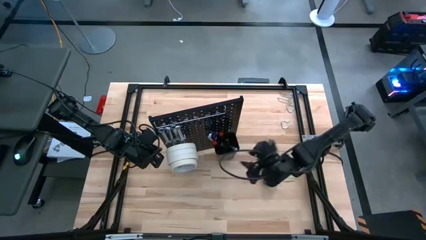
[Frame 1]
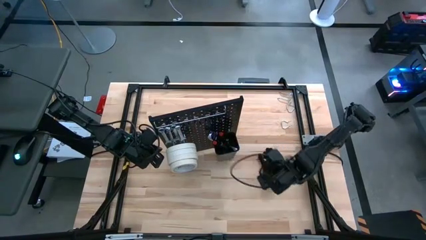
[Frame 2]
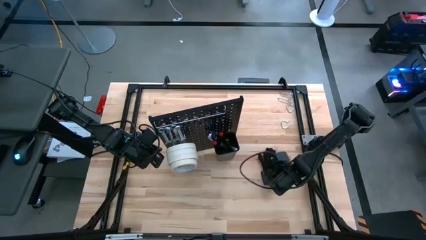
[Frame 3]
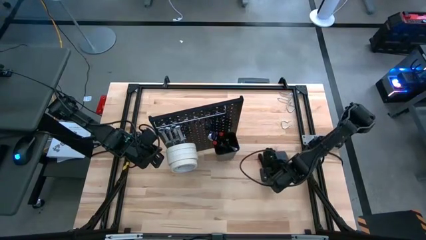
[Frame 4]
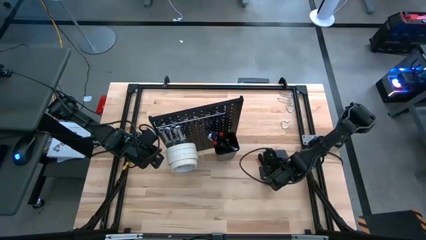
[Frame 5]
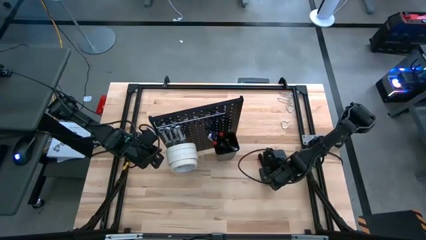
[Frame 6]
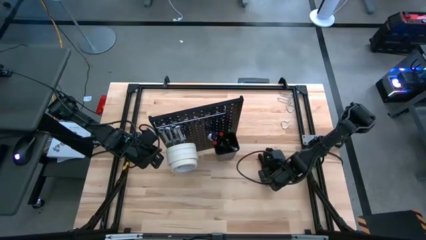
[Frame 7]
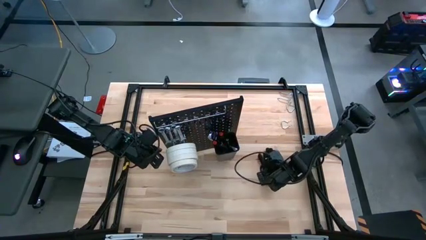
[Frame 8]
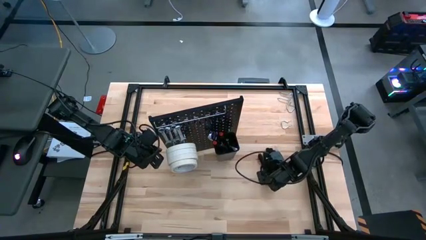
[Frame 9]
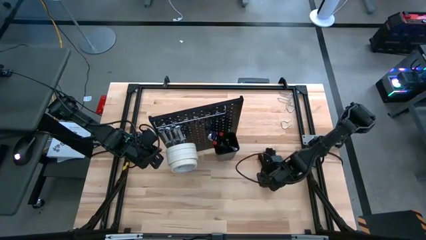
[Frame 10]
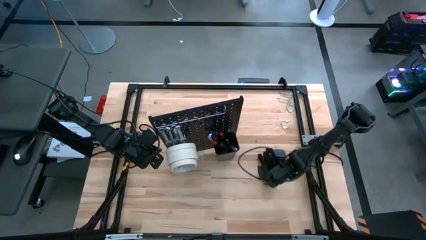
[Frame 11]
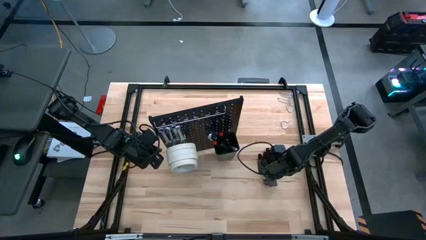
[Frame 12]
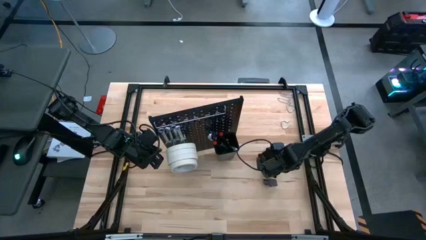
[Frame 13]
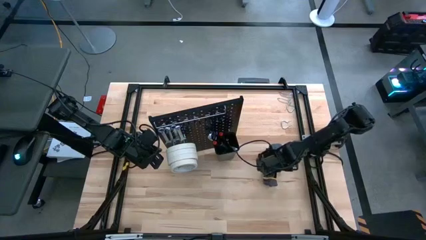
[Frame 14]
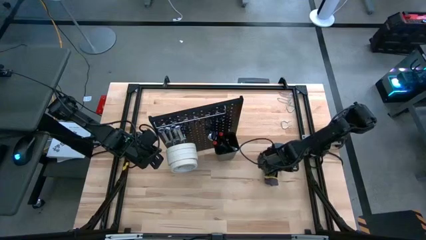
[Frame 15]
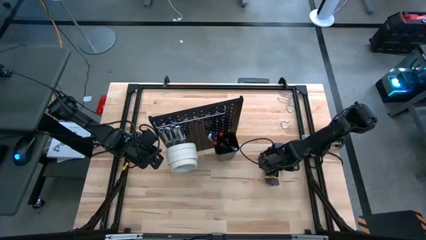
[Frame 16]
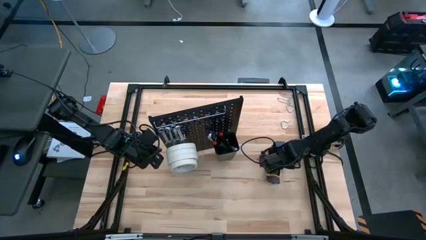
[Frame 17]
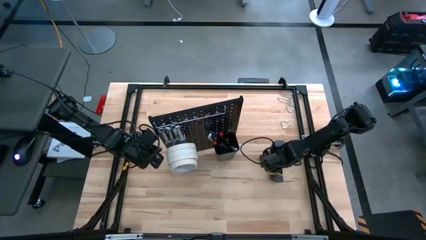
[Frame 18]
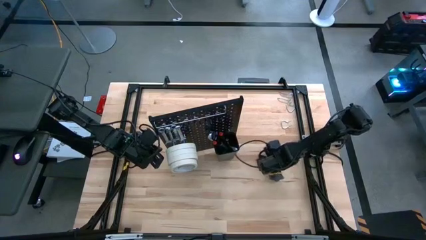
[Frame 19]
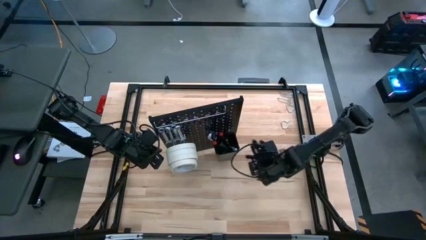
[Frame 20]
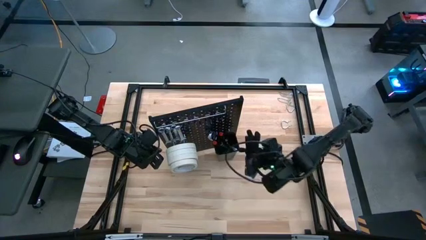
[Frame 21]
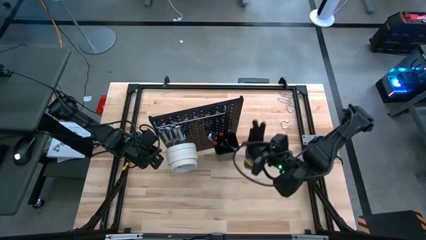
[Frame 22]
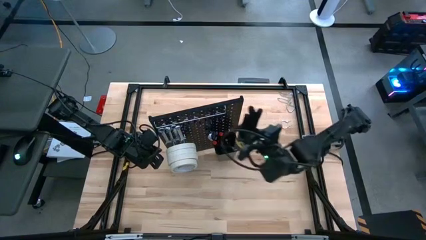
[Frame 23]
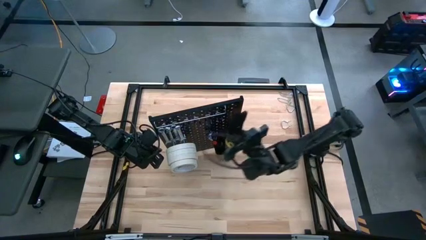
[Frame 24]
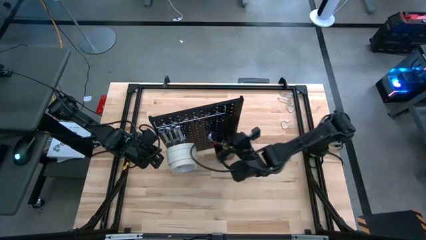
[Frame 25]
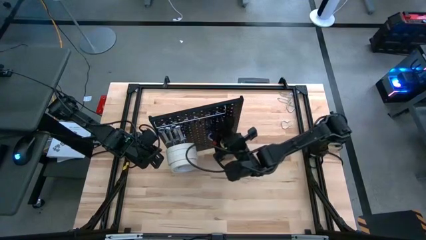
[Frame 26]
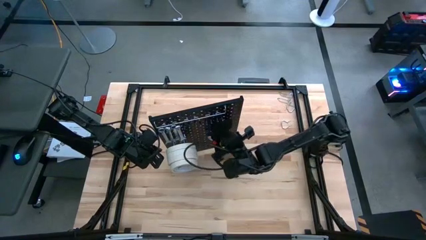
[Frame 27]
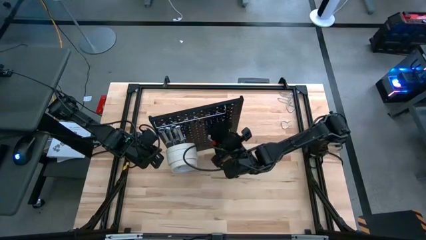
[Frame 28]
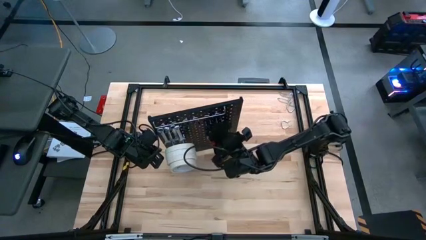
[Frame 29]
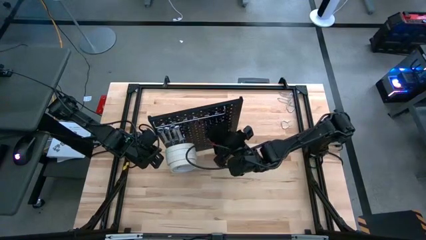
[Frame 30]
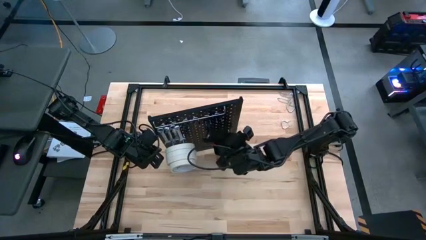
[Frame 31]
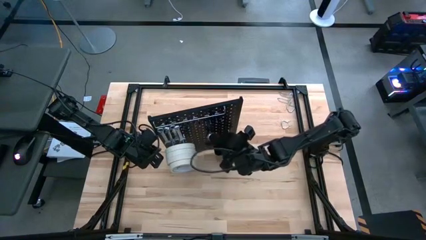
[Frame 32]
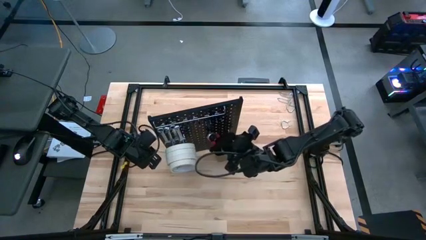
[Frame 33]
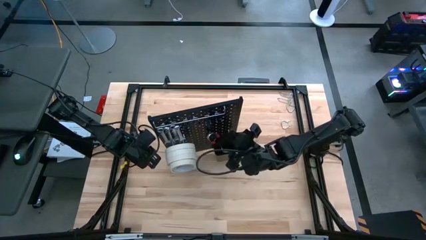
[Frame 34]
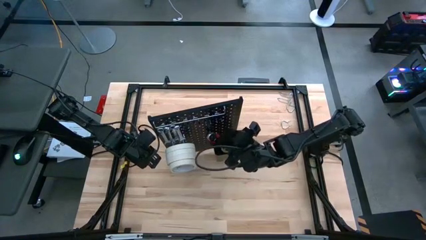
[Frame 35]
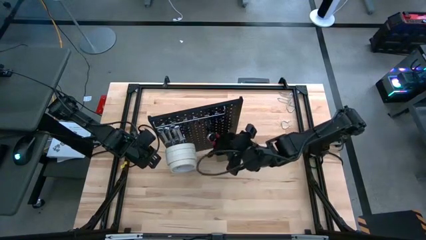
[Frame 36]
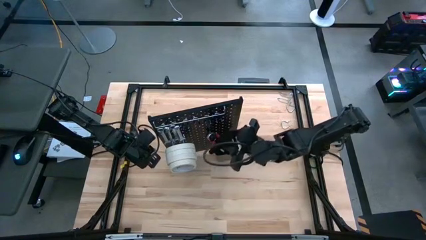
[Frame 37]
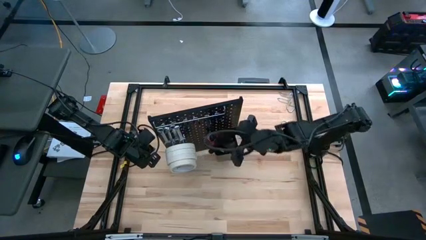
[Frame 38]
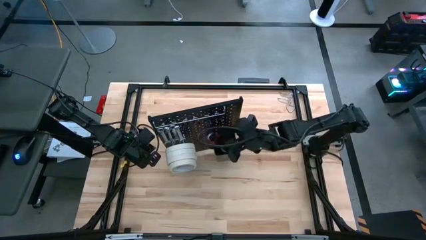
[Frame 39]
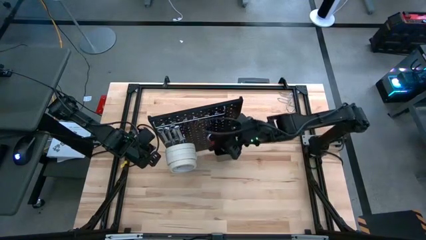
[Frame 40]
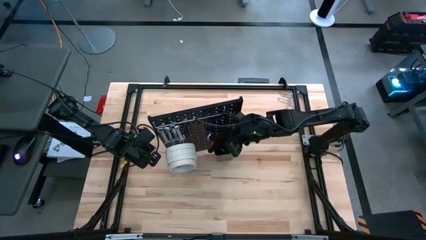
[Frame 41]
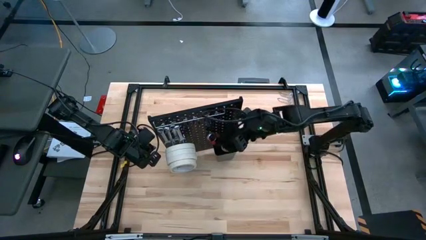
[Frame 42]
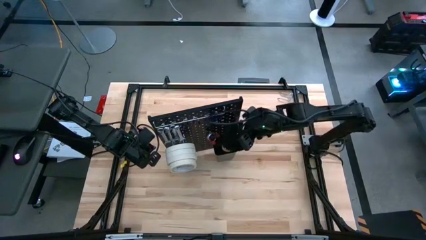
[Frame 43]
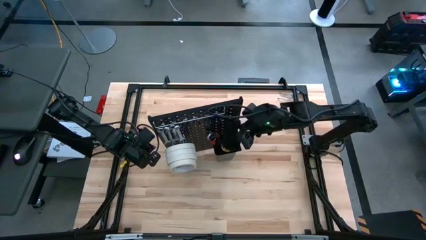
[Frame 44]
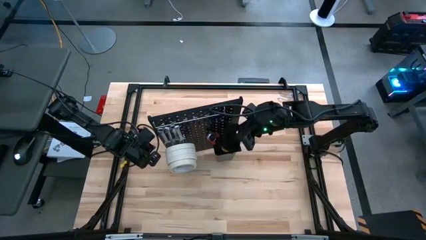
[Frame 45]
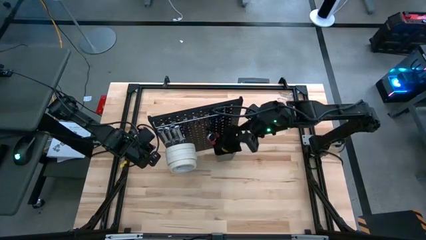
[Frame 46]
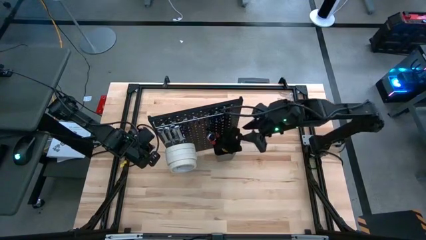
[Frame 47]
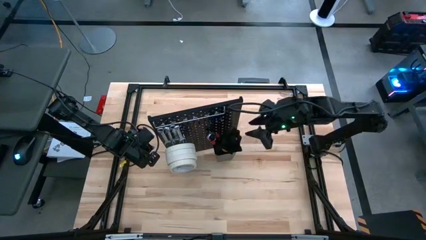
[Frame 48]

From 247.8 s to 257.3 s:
Task: Hang tools onto peg board
Hang the gloves onto the pegboard

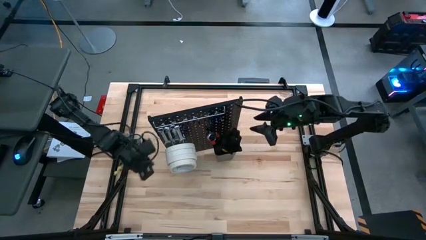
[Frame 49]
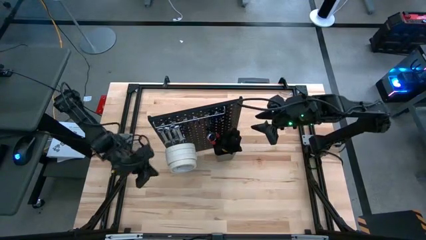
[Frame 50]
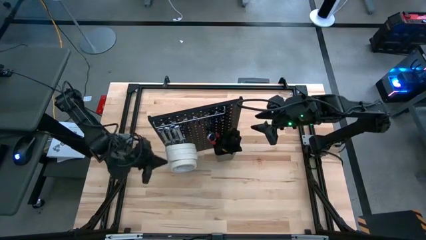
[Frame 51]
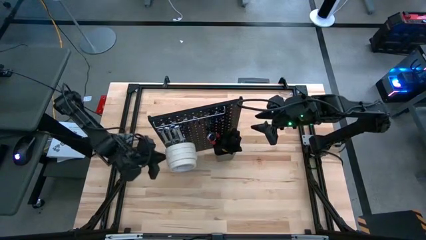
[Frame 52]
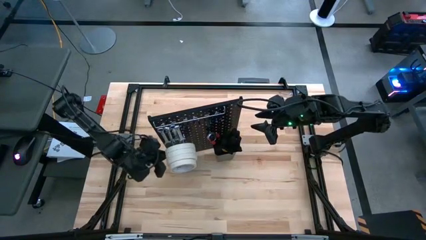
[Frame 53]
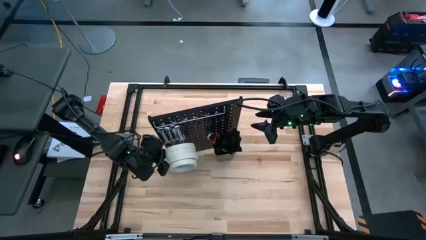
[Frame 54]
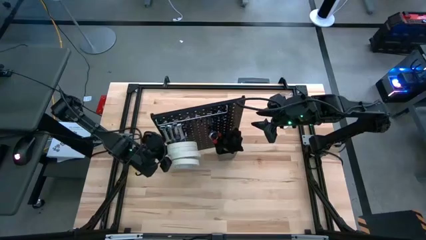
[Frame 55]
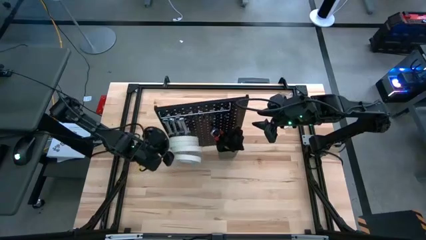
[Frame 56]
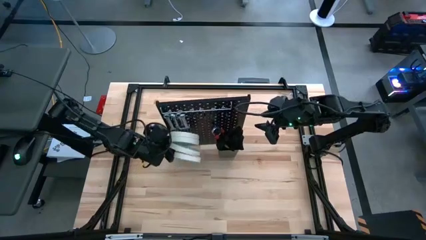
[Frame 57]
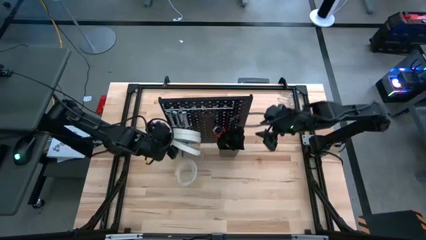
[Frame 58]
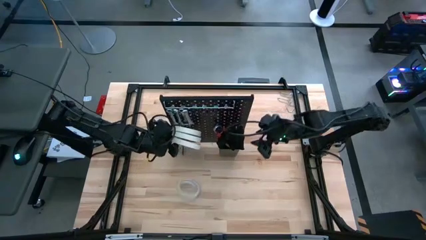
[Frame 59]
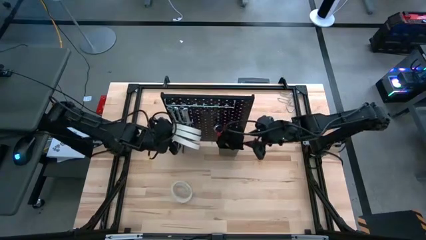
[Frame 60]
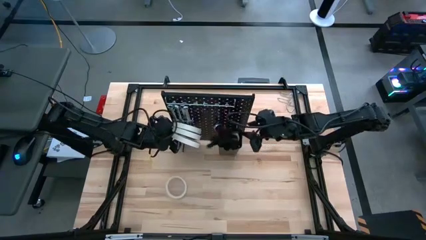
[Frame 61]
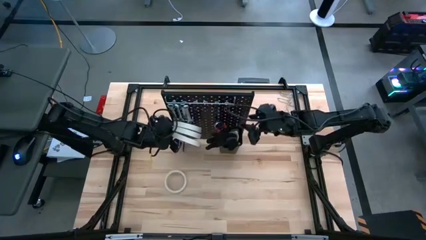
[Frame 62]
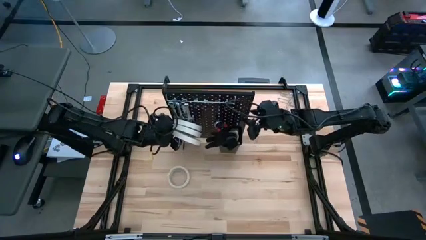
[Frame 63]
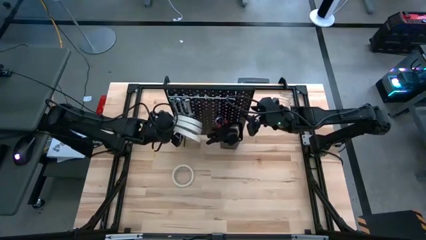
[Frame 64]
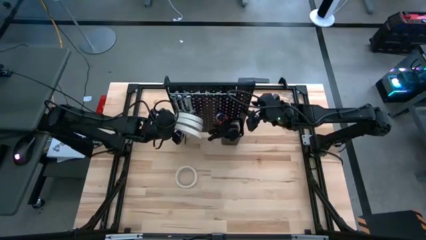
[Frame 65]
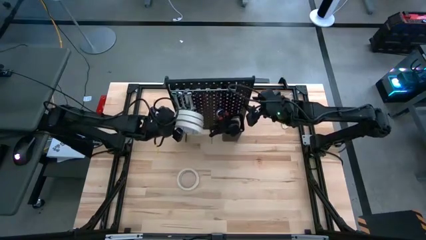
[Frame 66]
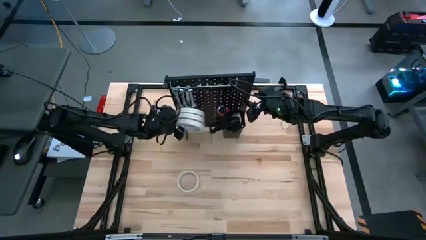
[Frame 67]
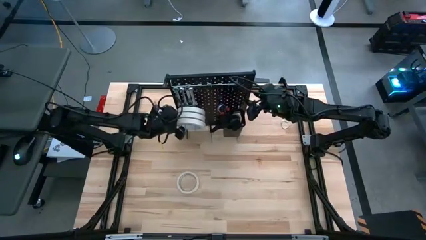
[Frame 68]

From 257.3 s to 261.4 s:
Move the pegboard to the top middle
